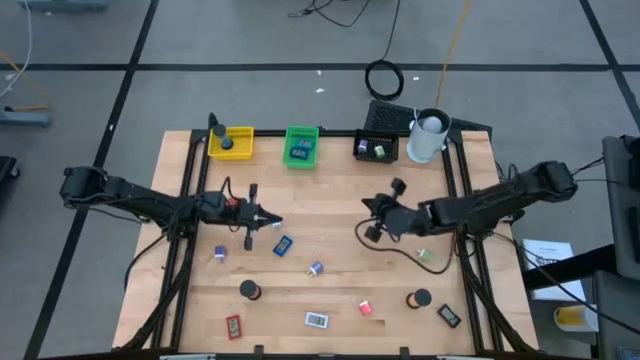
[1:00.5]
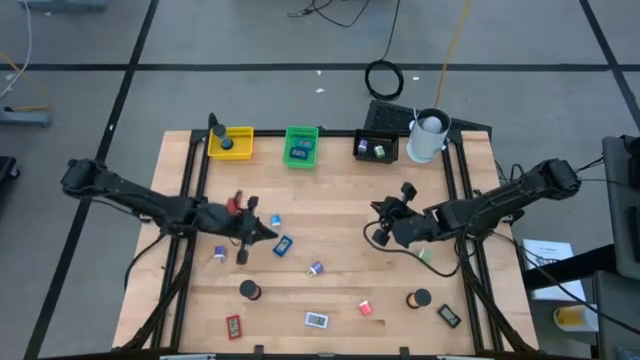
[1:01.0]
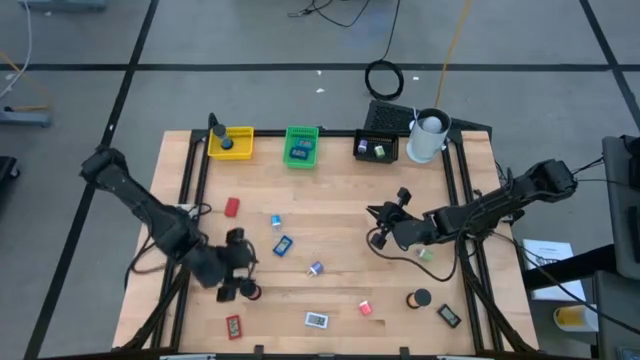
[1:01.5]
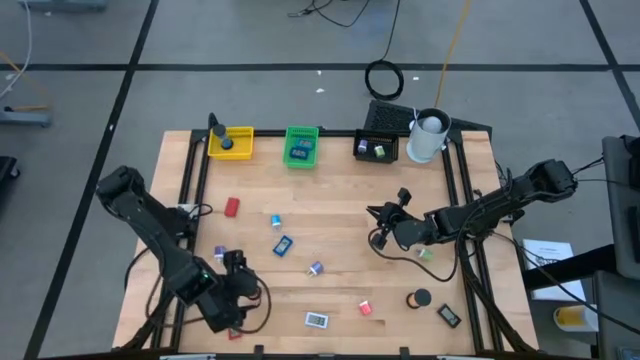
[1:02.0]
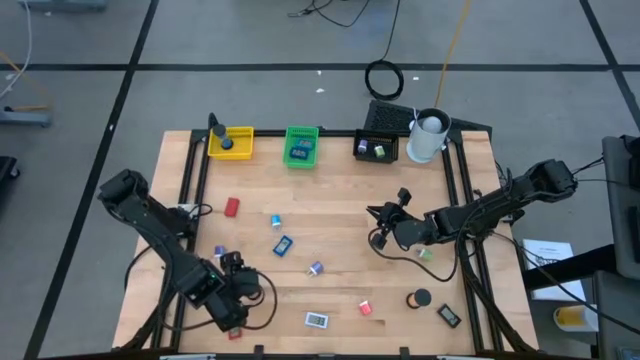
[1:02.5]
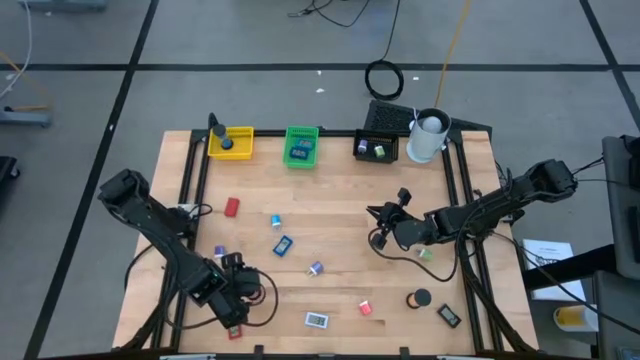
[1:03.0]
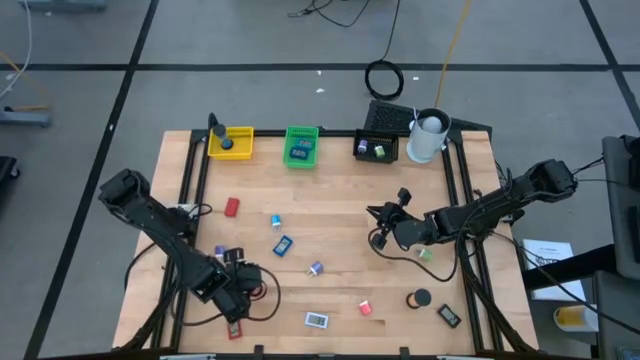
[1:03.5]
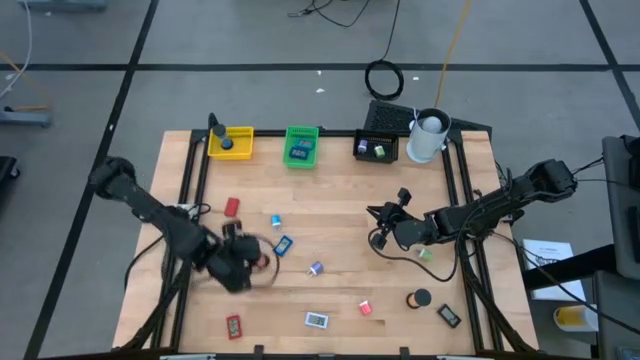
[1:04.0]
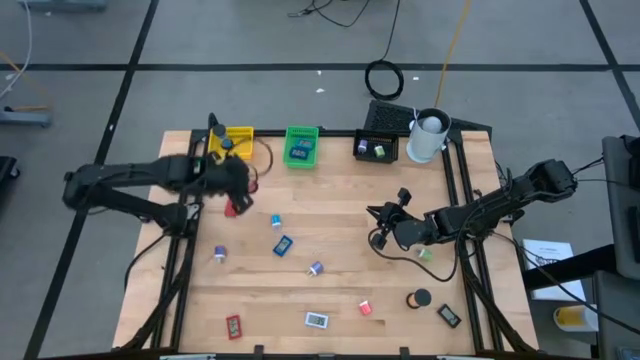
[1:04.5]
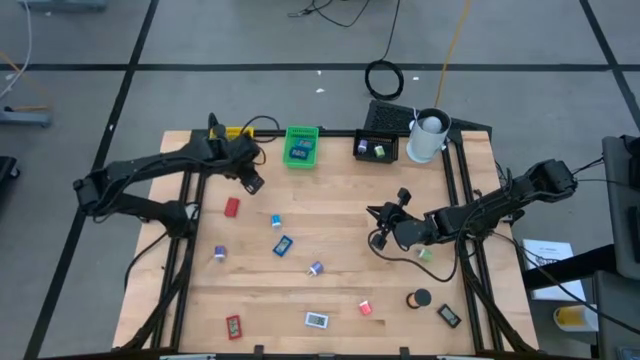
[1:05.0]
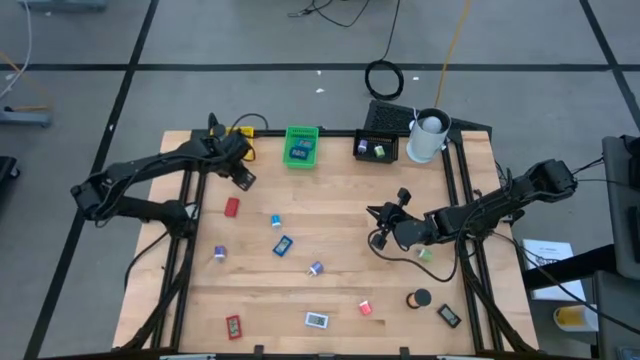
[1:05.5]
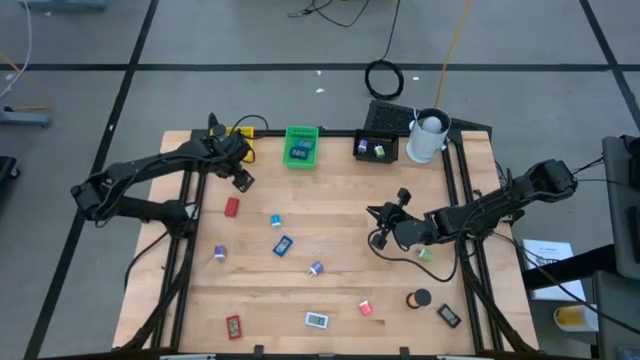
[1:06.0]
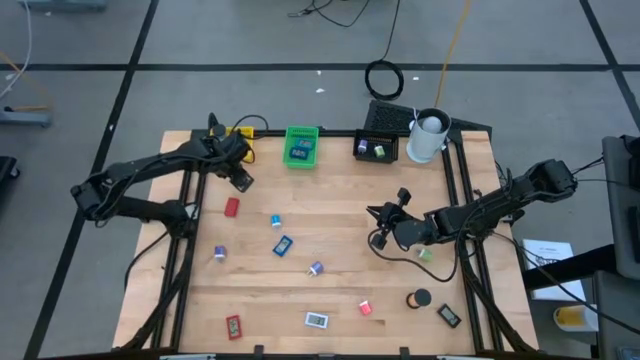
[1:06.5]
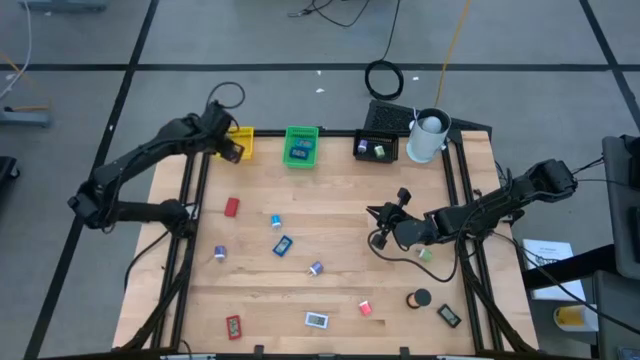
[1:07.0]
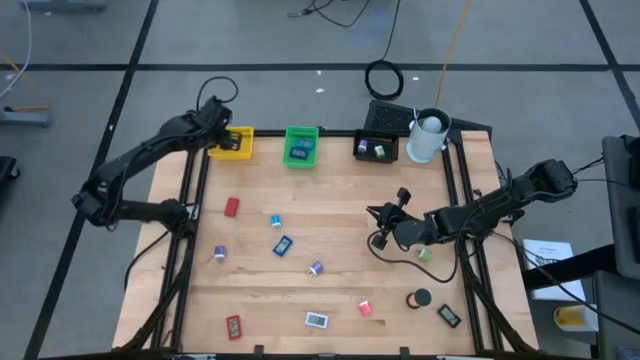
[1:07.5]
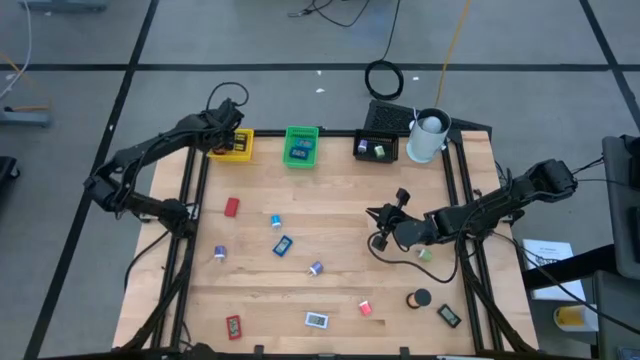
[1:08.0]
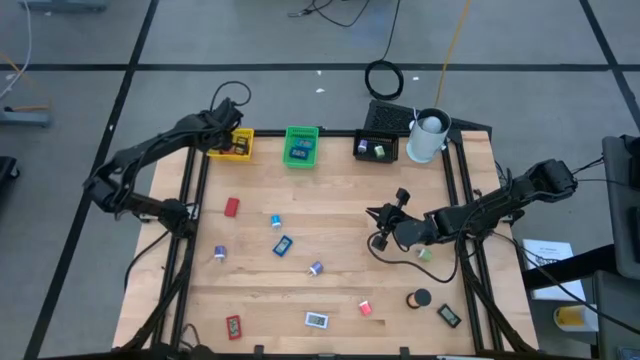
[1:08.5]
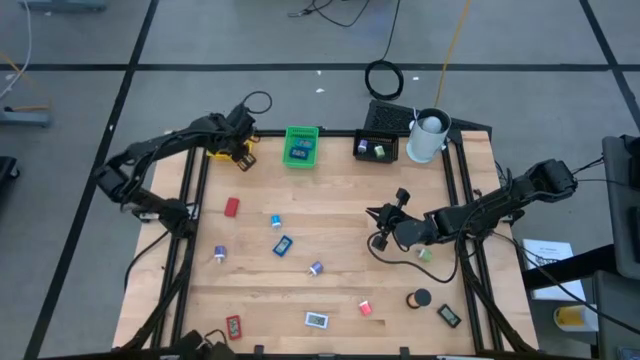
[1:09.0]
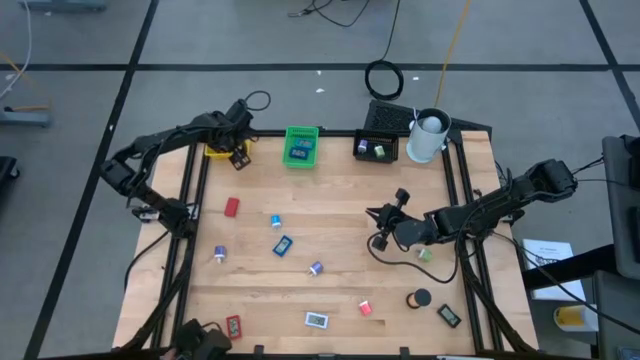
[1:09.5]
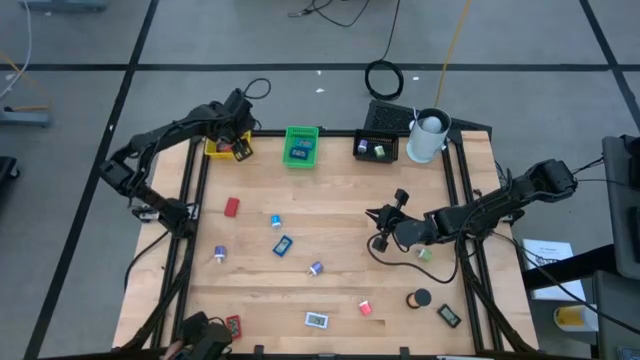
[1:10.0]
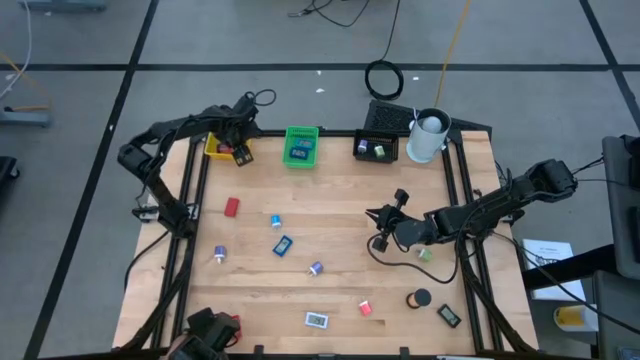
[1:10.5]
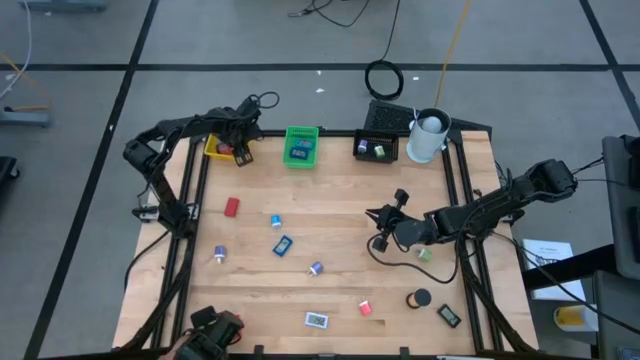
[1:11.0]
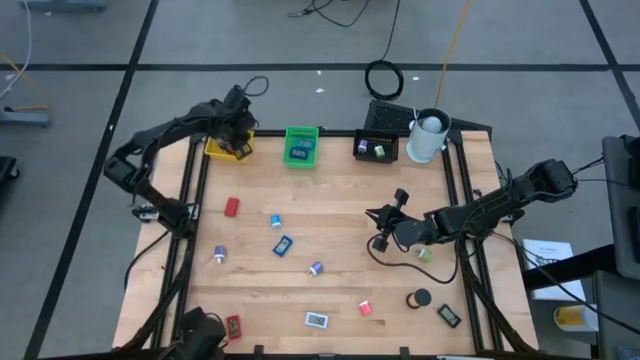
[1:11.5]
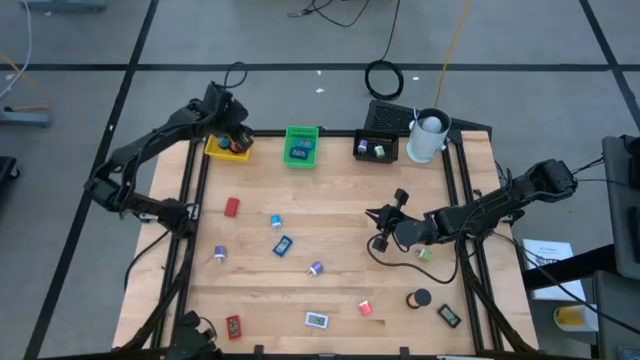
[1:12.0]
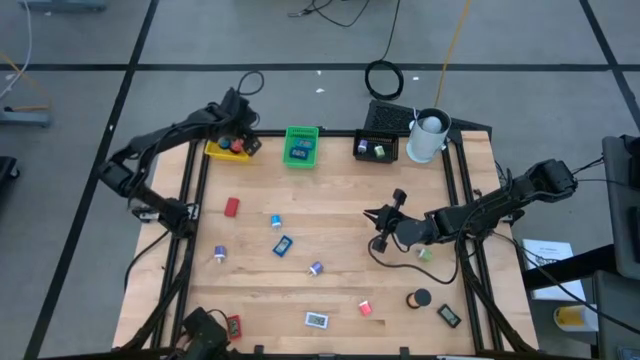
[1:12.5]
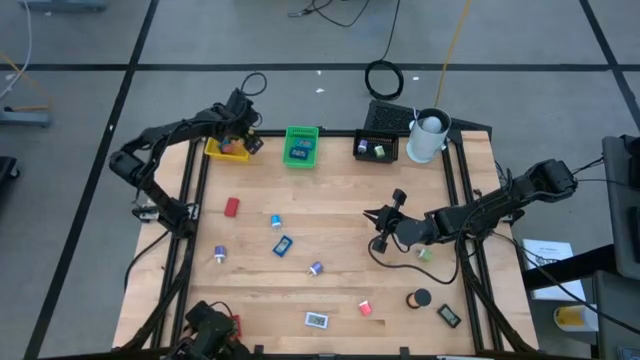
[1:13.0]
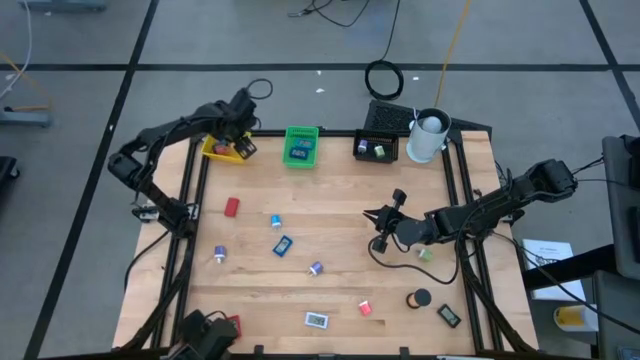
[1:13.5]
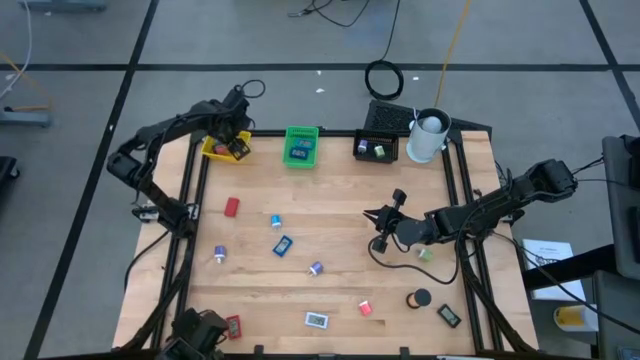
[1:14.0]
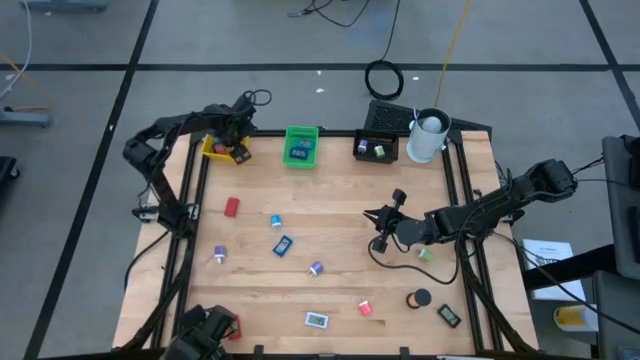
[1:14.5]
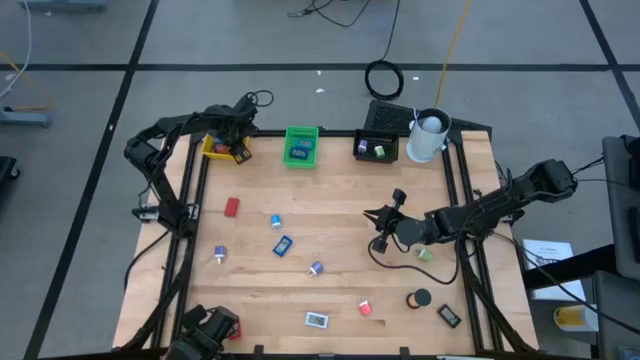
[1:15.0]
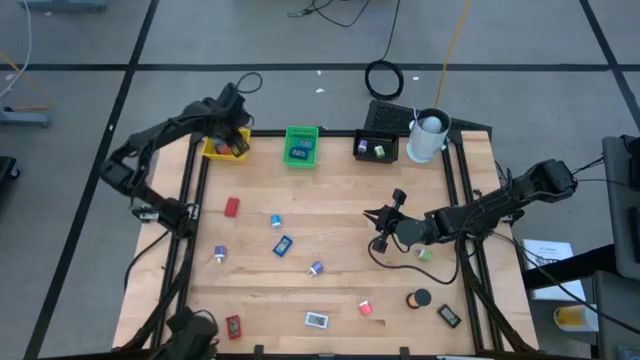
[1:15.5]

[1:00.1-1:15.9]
Task: Pick & Place Office items
Put the red sand timer into the yellow bin

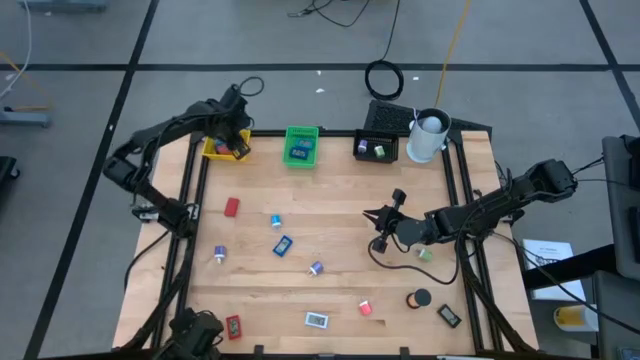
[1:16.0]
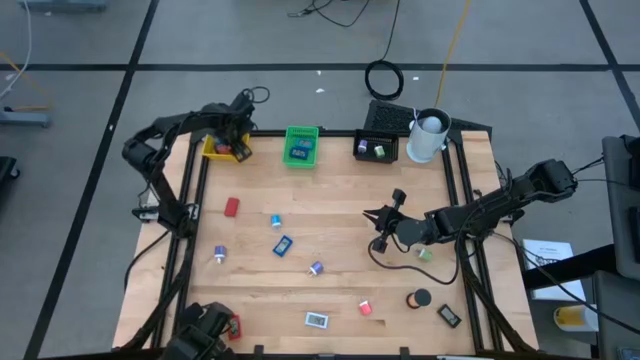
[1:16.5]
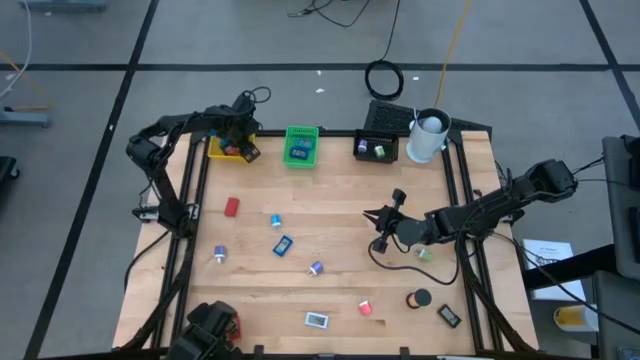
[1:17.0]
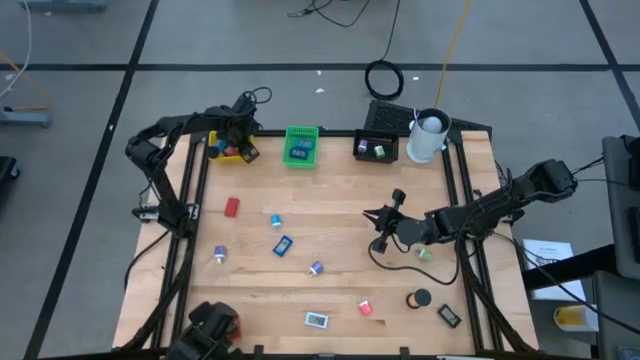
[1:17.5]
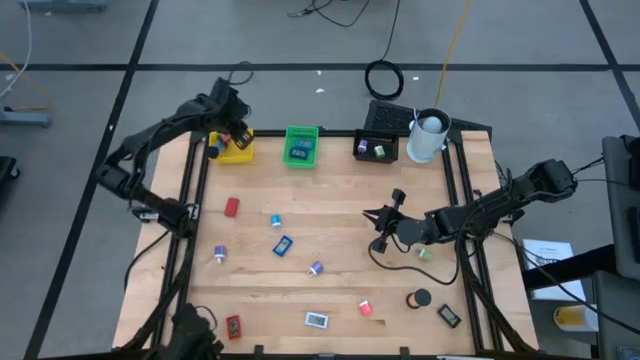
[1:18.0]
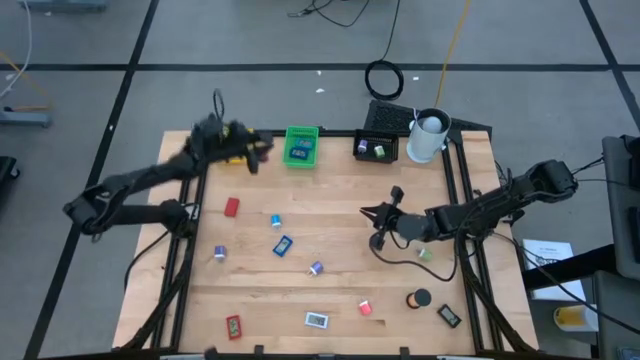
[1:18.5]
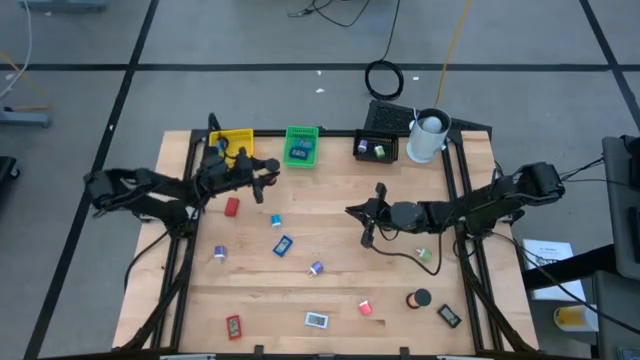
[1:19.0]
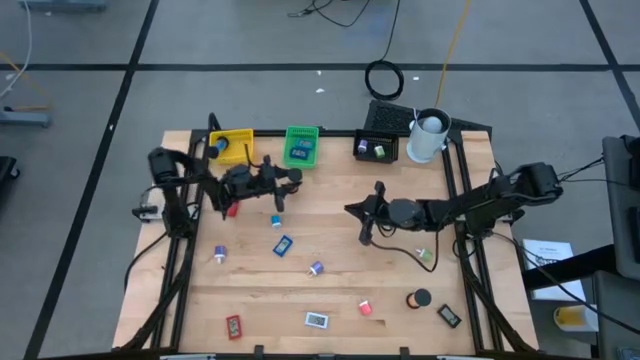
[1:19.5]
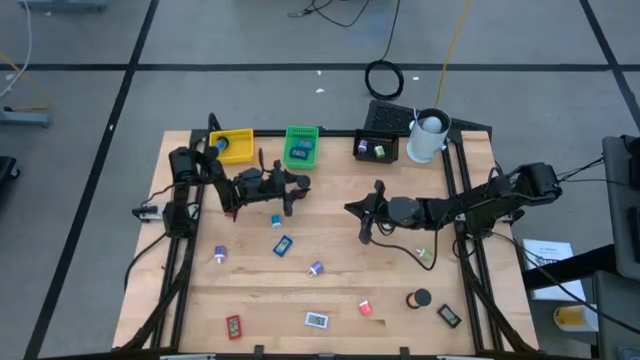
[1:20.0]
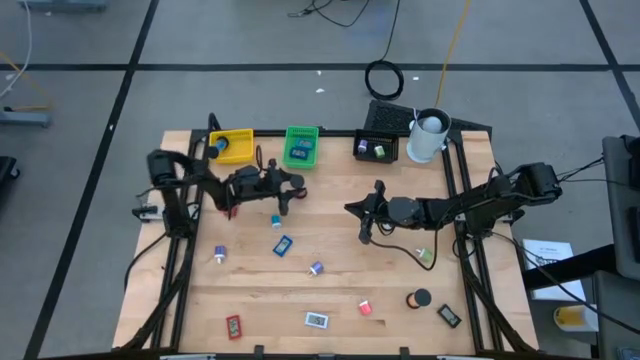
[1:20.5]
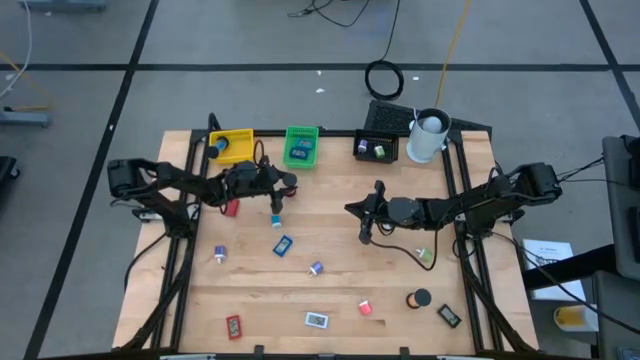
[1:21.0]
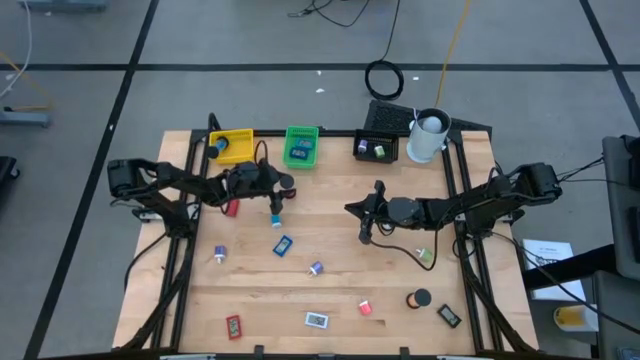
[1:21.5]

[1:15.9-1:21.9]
Remove the red sand timer from the yellow bin
